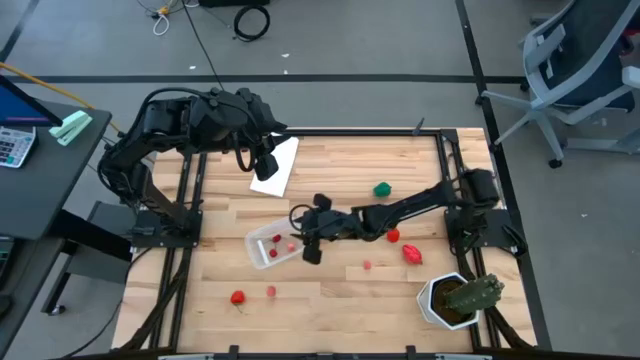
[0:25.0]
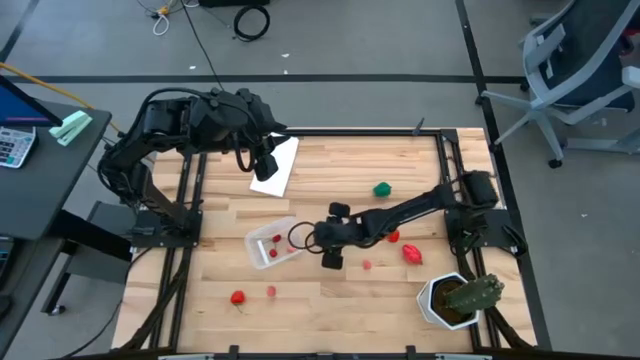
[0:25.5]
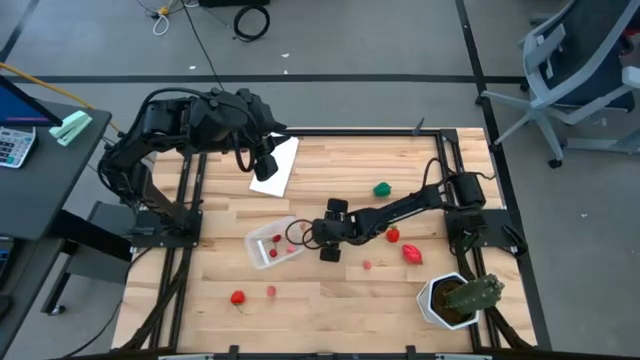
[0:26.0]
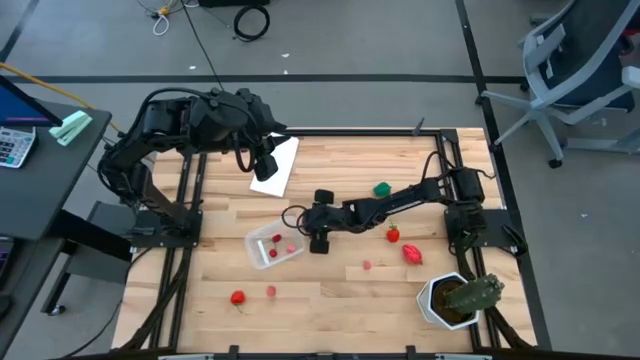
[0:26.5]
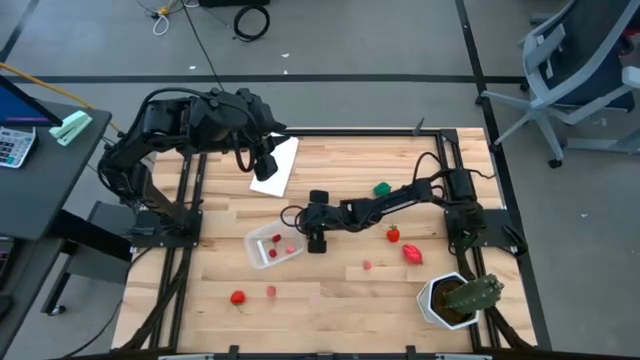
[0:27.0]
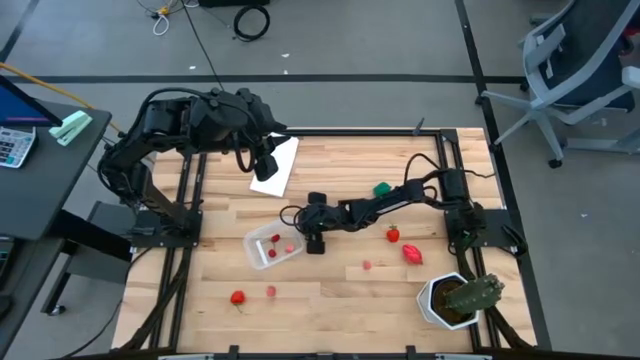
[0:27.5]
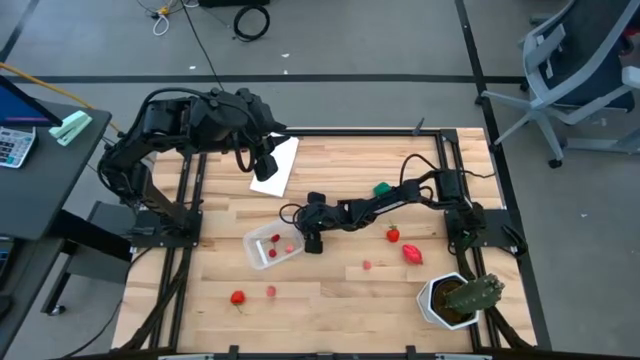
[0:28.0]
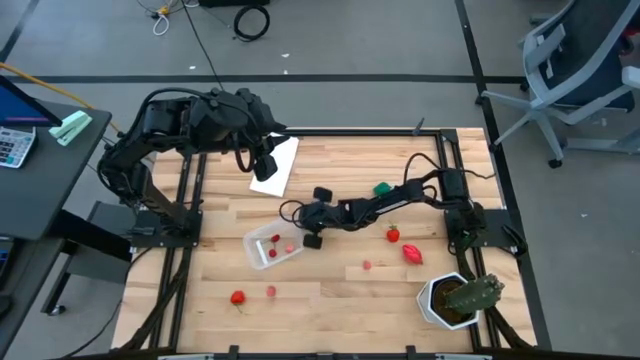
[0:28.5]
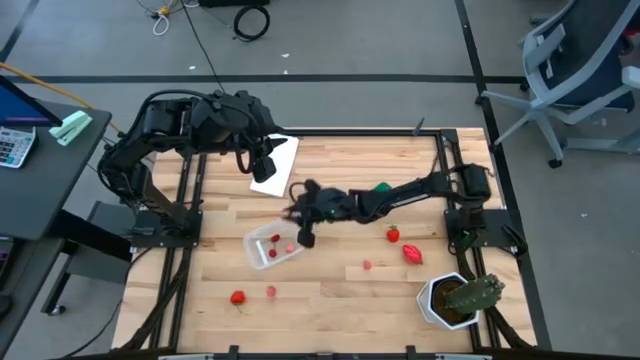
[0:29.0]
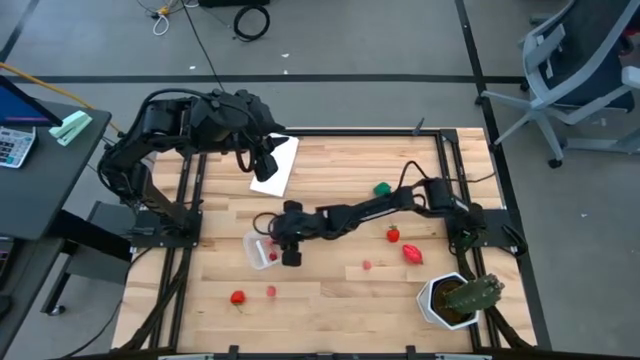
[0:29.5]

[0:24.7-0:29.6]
Task: Pick and placing Produce into tupperware
Put the peach into the transparent bin

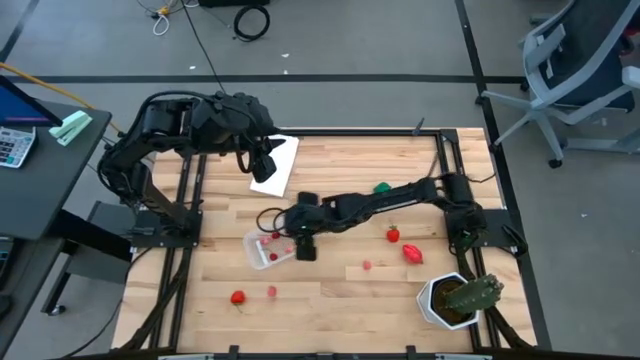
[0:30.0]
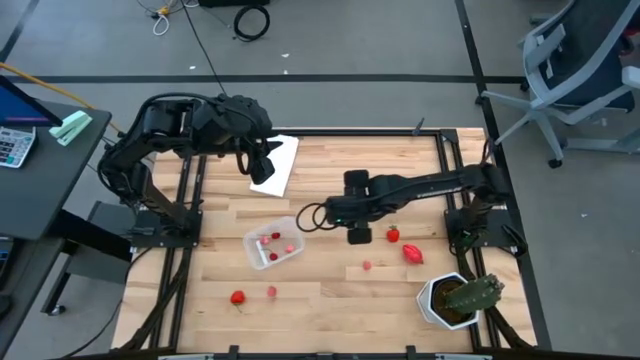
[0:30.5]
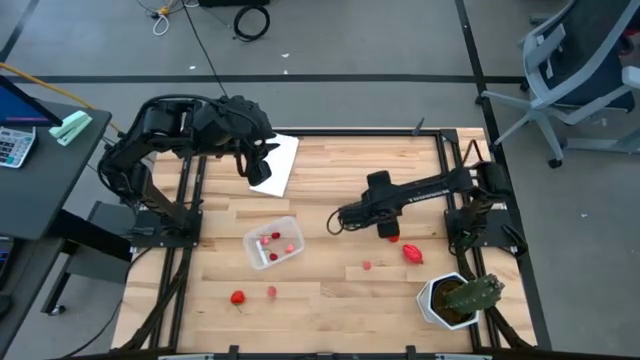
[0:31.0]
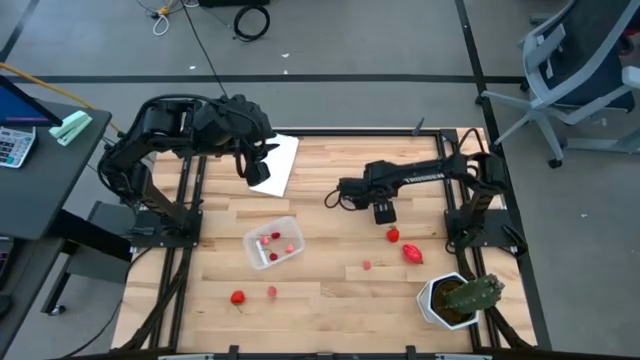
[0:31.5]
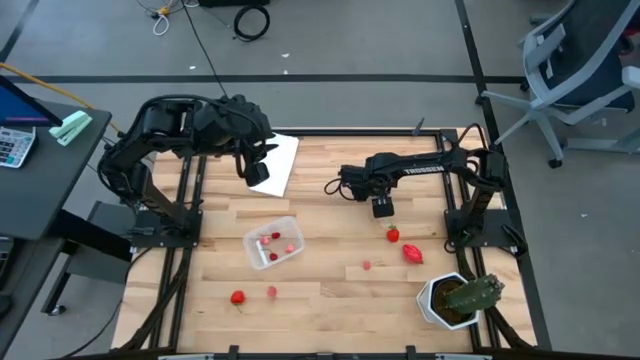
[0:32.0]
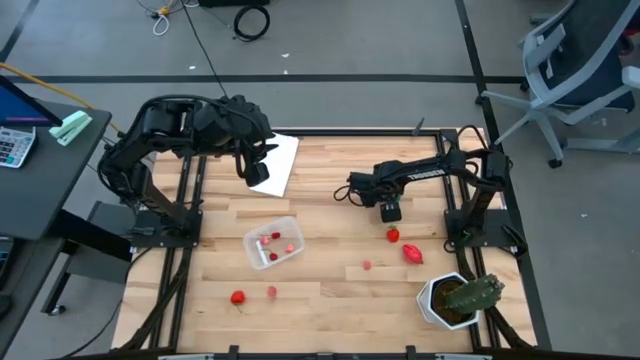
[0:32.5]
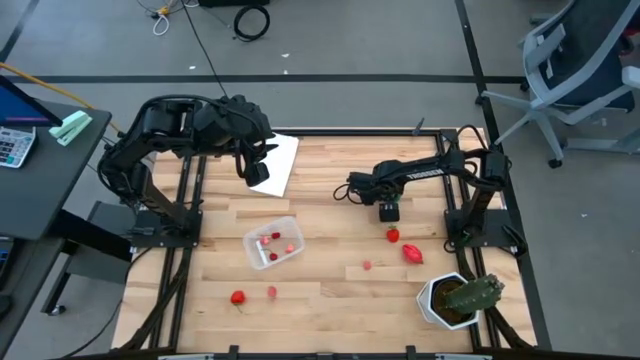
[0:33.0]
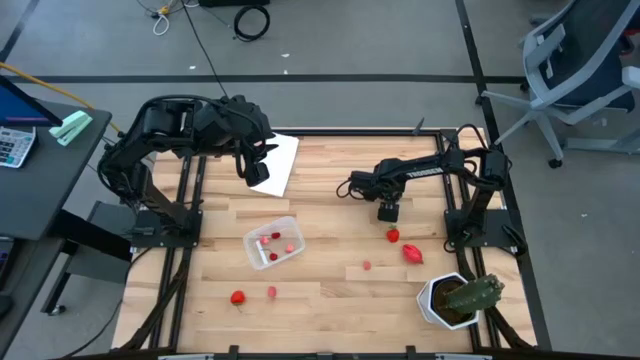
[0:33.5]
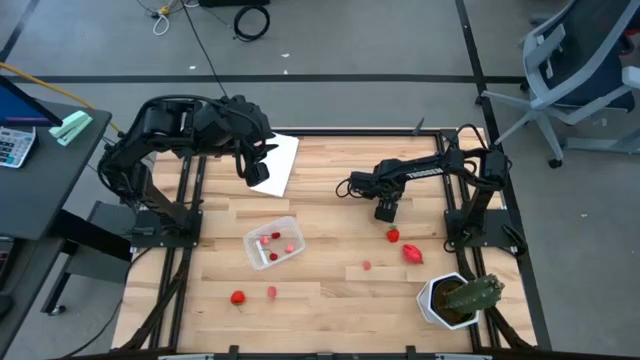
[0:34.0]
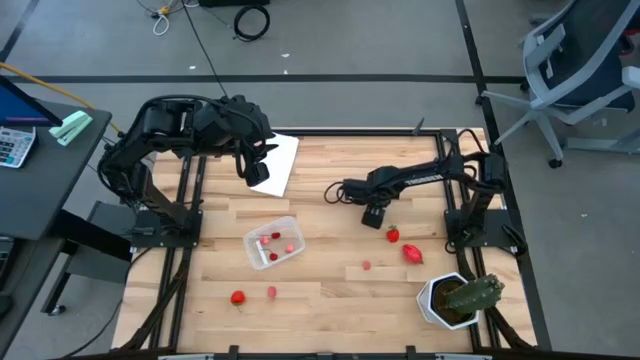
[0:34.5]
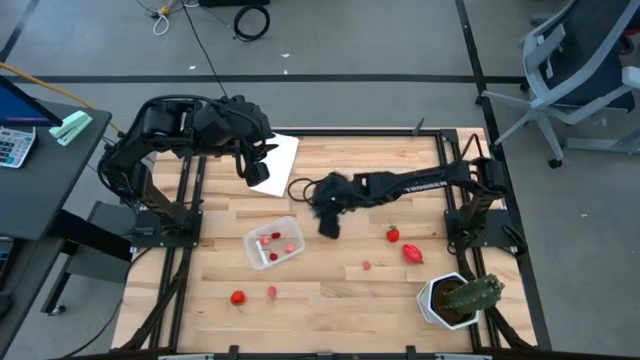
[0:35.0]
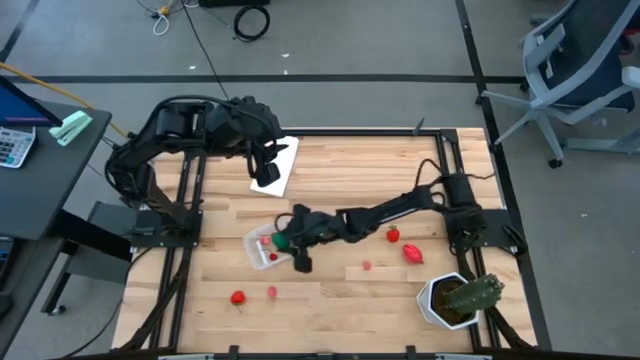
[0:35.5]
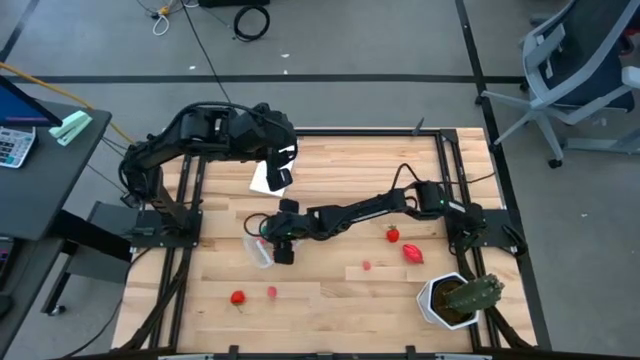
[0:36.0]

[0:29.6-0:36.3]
Put the green bell pepper into the transparent bin

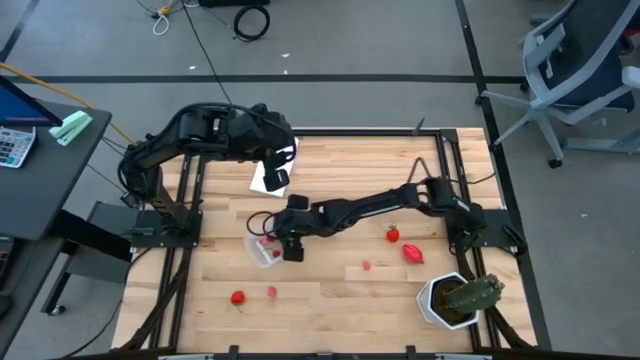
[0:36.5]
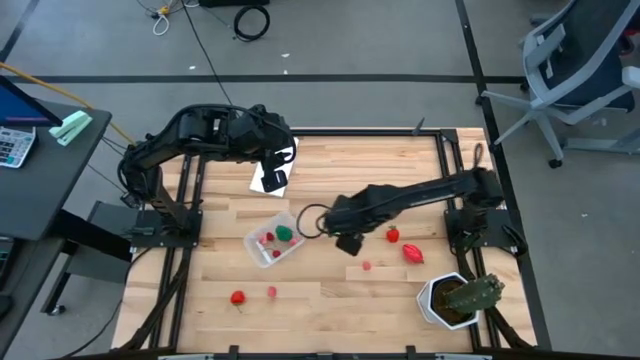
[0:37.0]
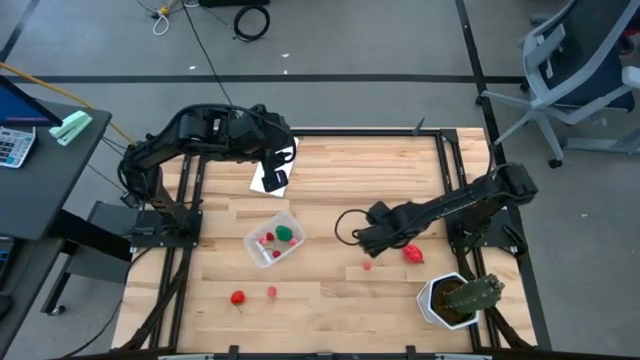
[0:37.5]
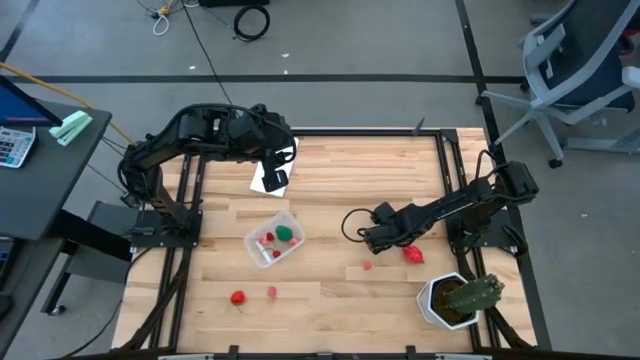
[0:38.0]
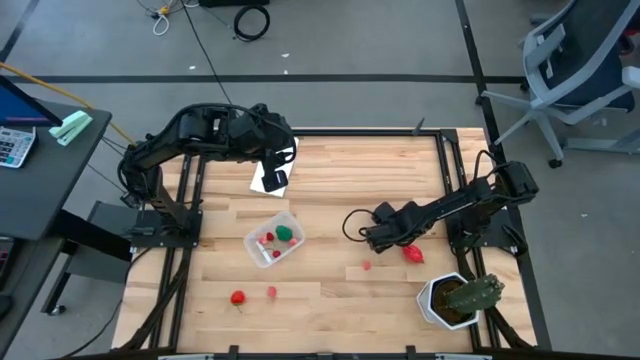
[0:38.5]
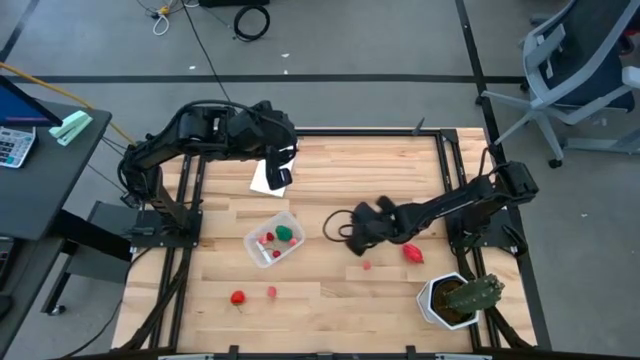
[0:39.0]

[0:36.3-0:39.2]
Put the strawberry into the transparent bin

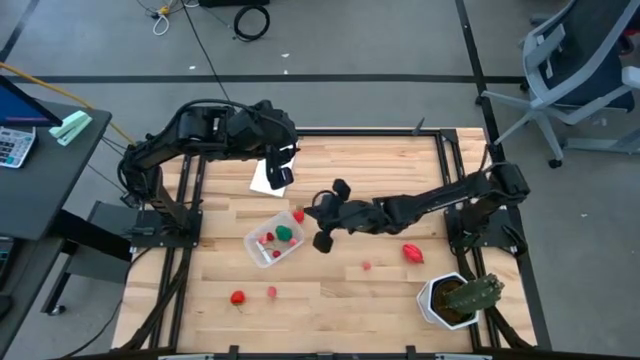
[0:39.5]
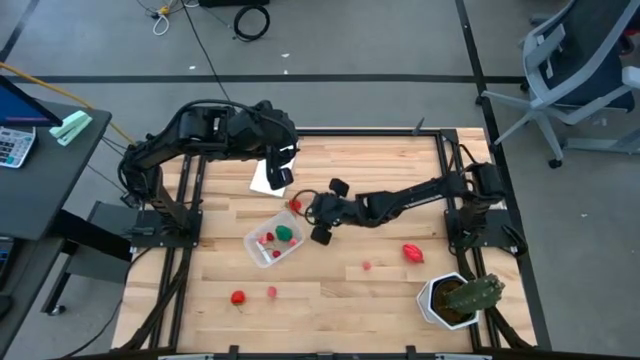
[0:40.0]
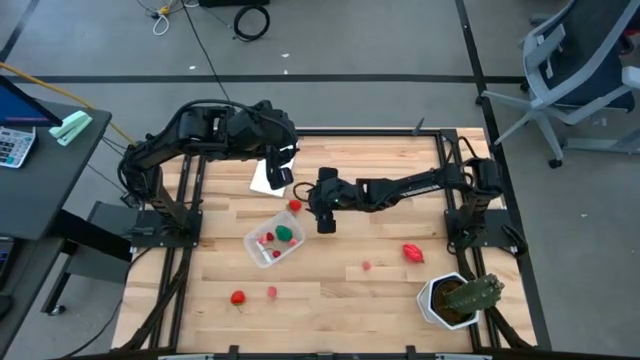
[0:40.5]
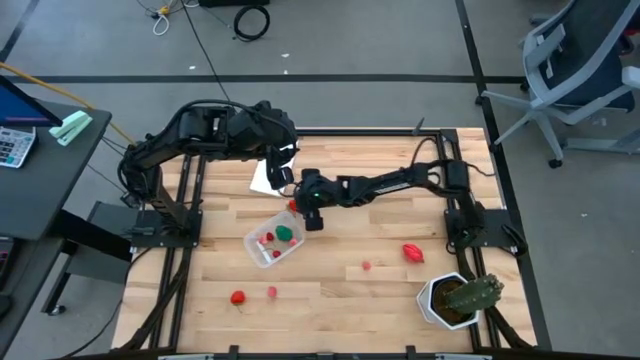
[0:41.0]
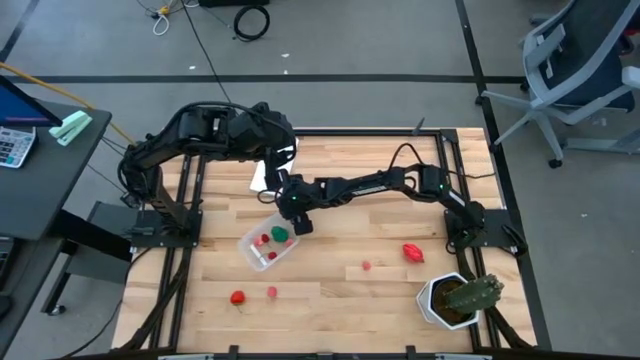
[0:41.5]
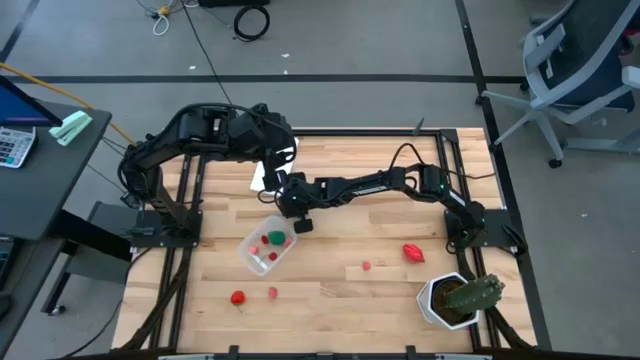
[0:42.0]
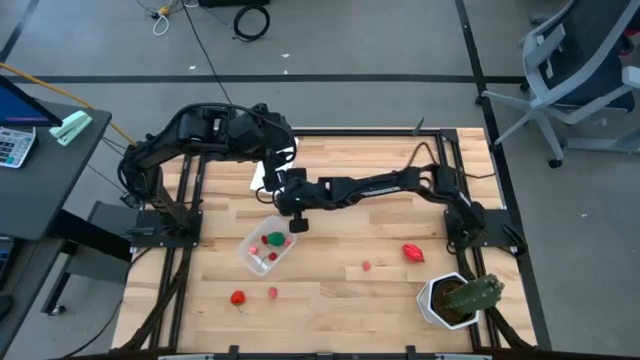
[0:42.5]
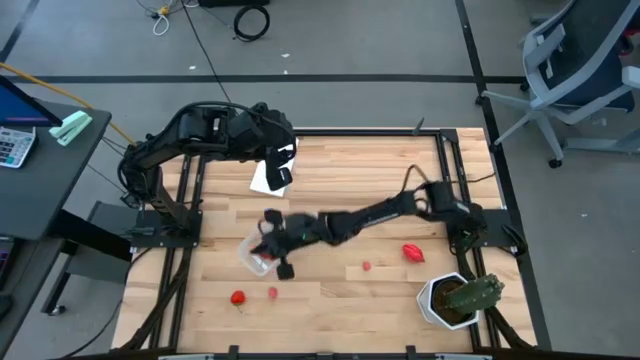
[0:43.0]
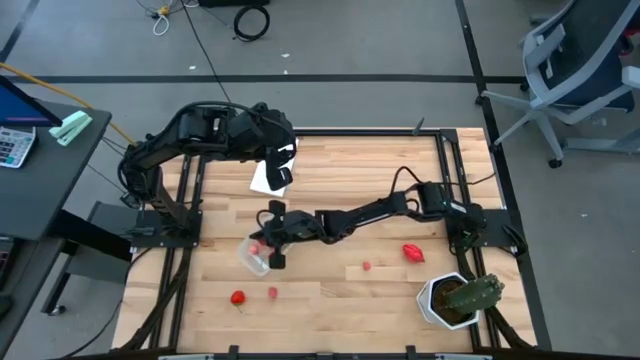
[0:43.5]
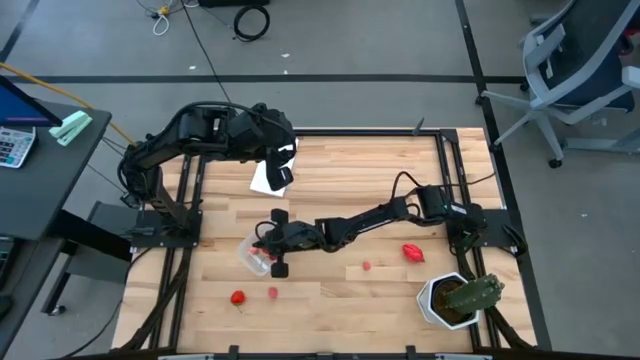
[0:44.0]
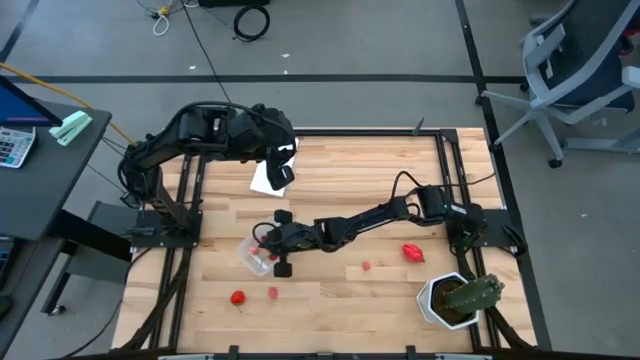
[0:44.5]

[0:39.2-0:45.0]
Put the strawberry into the transparent bin

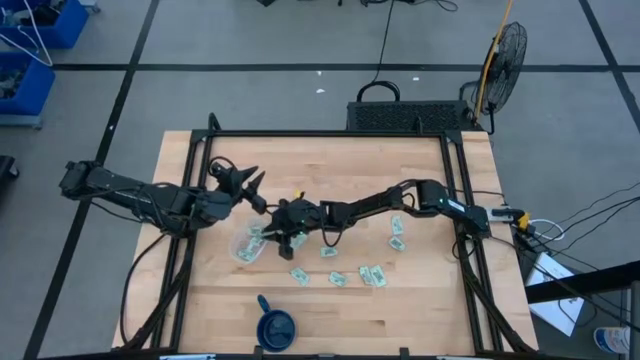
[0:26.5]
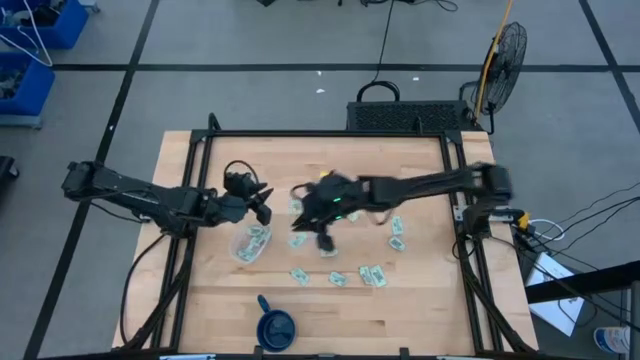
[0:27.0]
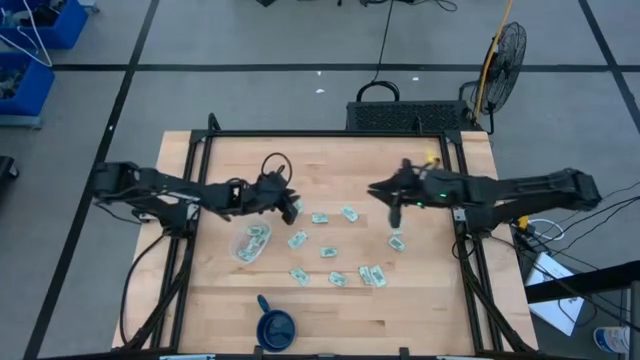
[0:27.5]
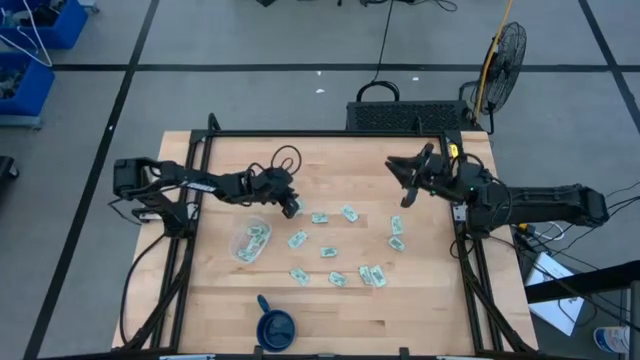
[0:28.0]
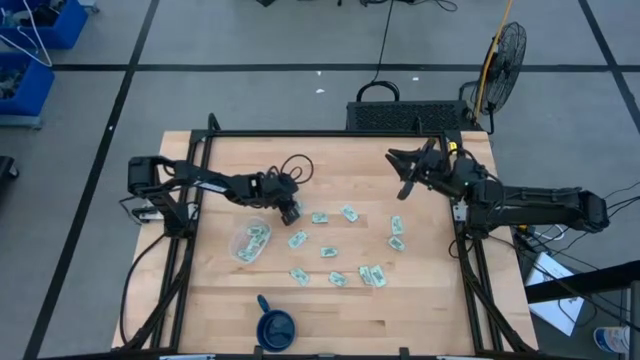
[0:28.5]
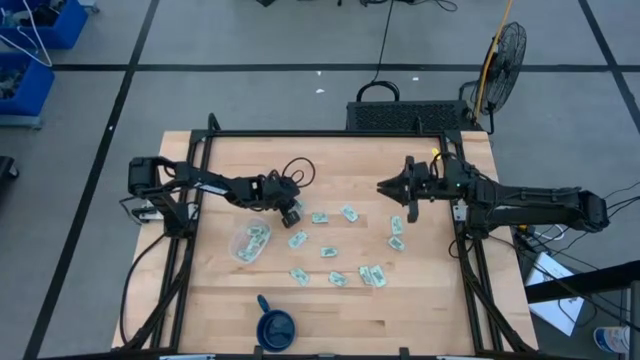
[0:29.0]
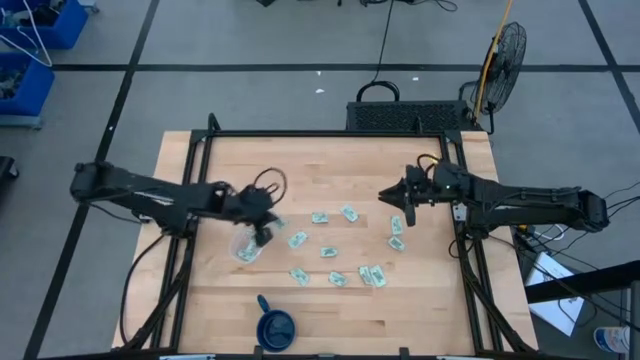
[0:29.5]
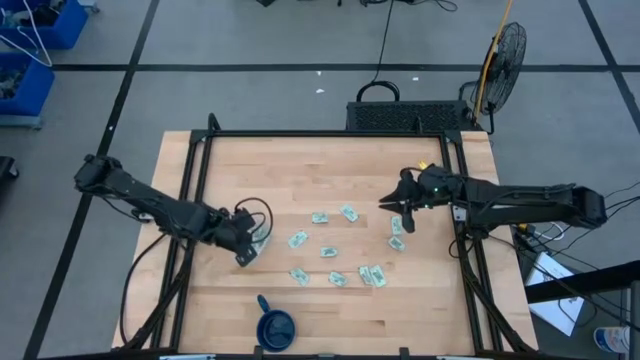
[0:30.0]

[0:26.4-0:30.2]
Task: Pick and place Stevia / Truvia into bins
Put the stevia packet into the transparent container
